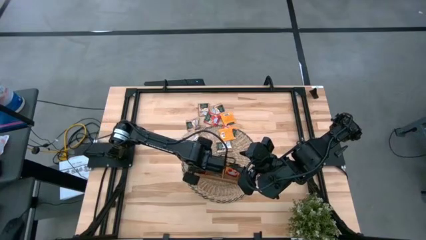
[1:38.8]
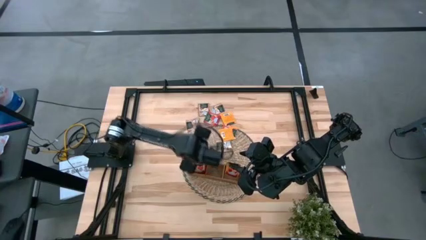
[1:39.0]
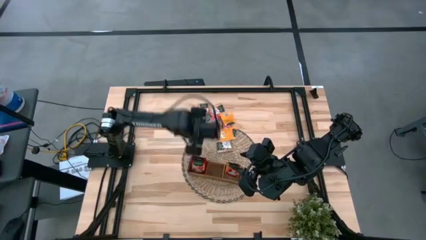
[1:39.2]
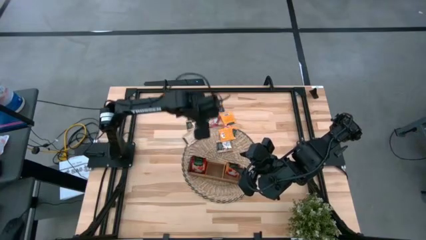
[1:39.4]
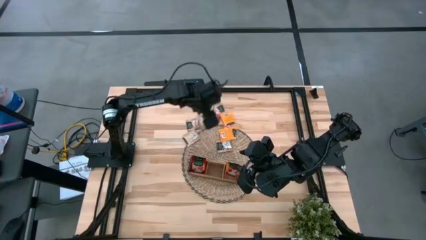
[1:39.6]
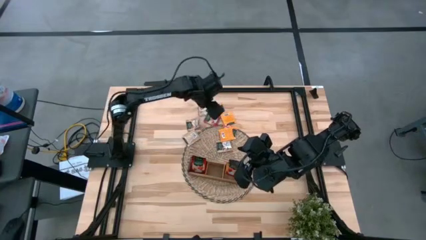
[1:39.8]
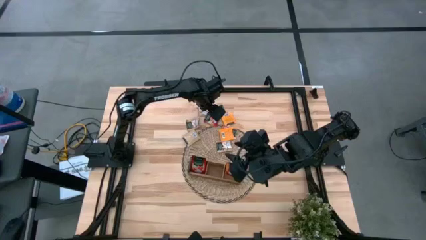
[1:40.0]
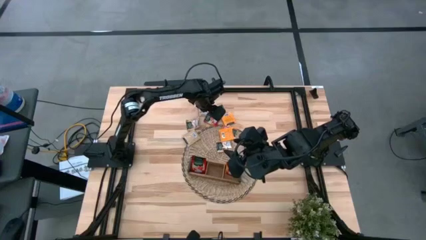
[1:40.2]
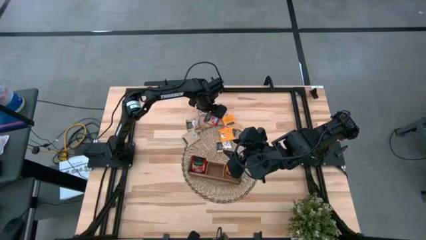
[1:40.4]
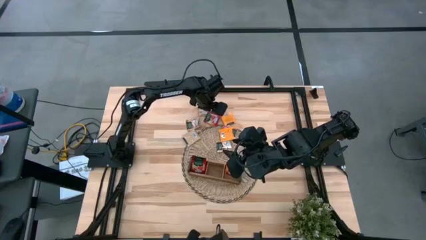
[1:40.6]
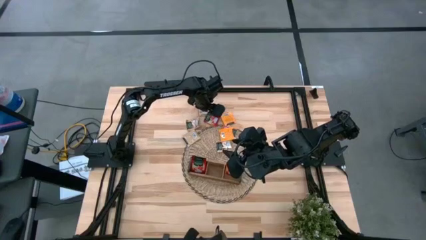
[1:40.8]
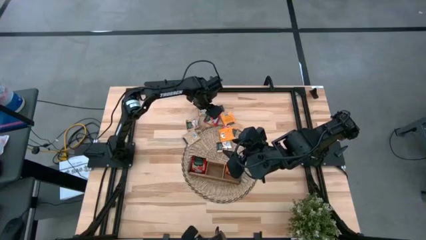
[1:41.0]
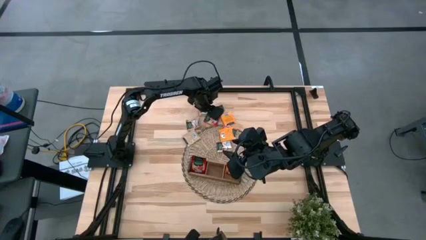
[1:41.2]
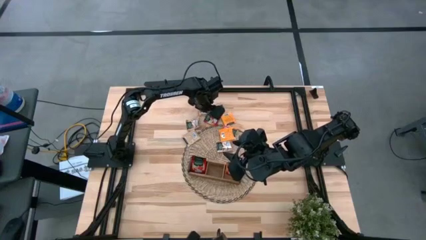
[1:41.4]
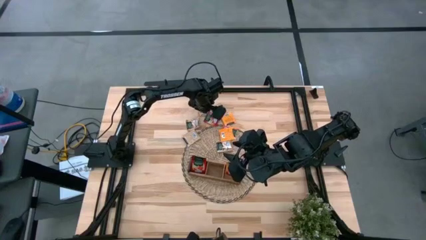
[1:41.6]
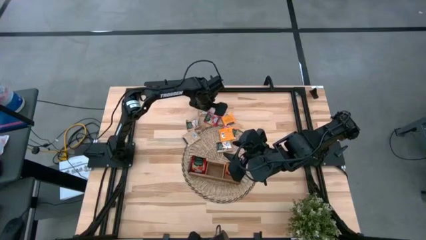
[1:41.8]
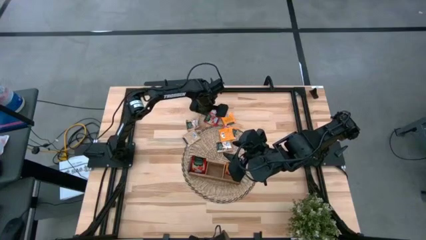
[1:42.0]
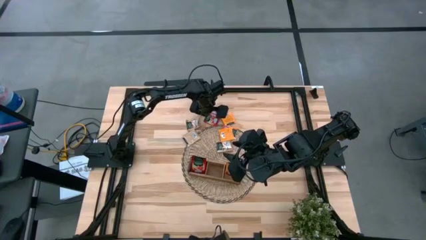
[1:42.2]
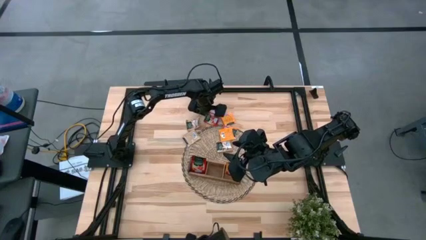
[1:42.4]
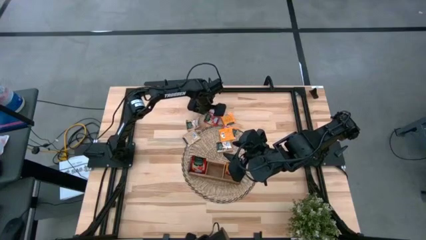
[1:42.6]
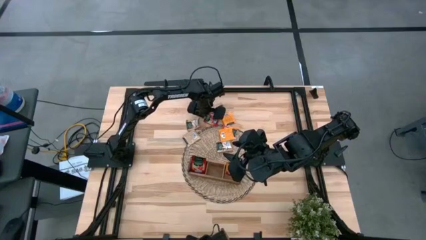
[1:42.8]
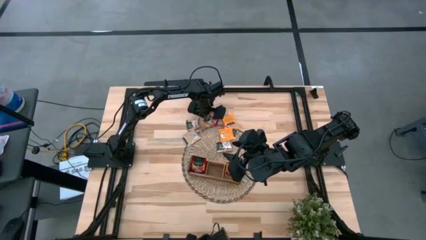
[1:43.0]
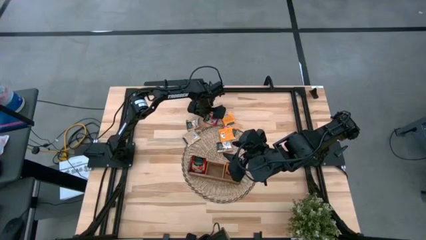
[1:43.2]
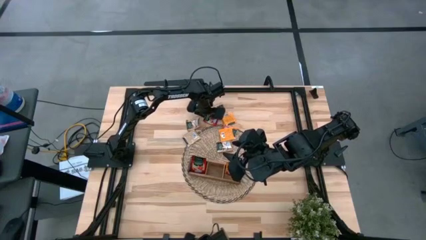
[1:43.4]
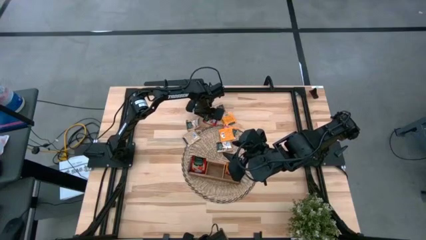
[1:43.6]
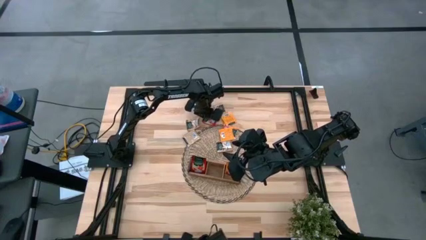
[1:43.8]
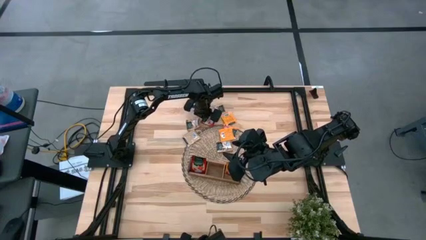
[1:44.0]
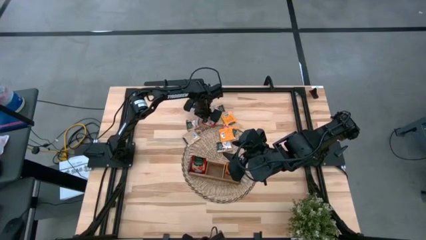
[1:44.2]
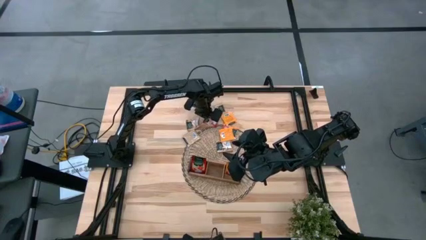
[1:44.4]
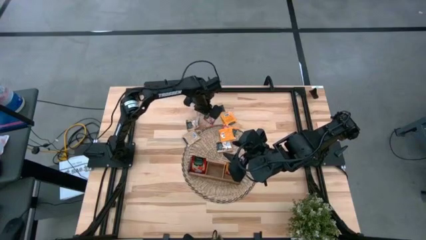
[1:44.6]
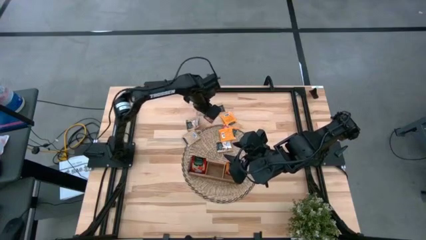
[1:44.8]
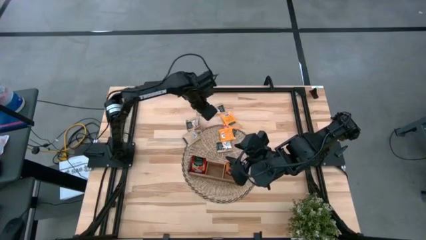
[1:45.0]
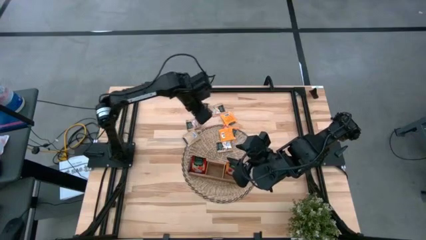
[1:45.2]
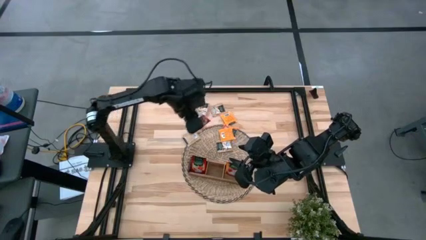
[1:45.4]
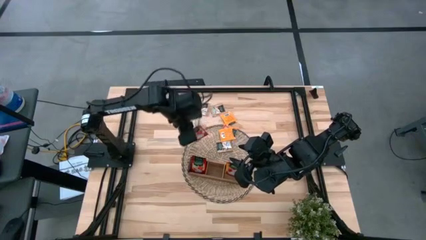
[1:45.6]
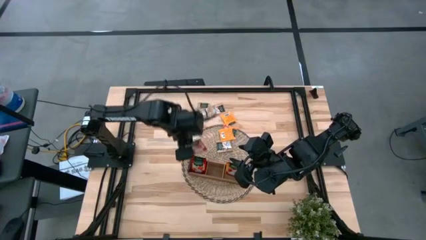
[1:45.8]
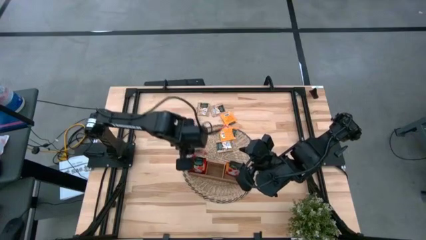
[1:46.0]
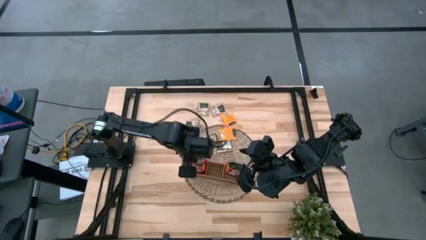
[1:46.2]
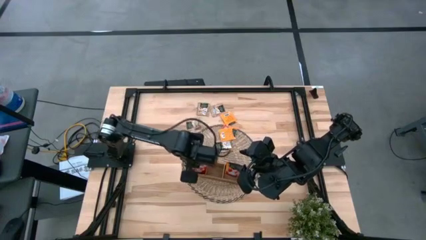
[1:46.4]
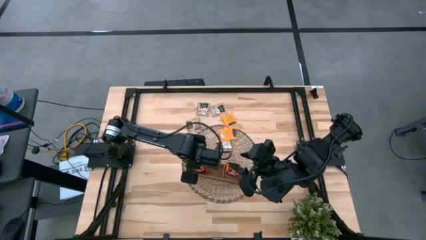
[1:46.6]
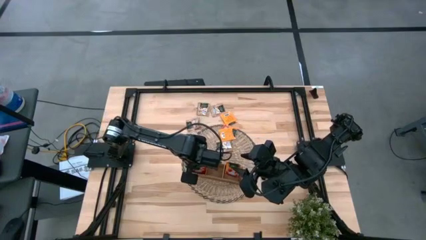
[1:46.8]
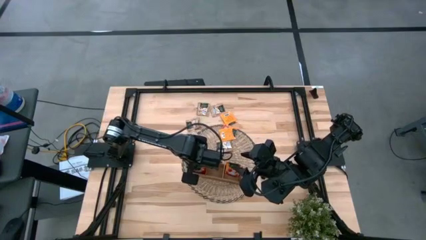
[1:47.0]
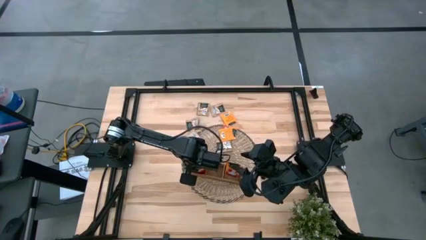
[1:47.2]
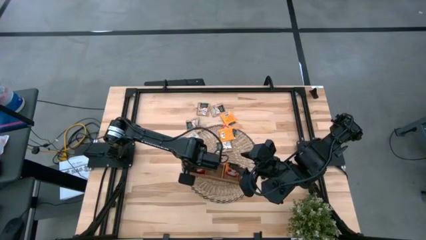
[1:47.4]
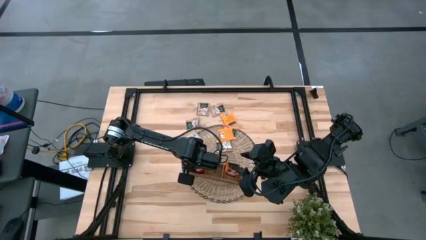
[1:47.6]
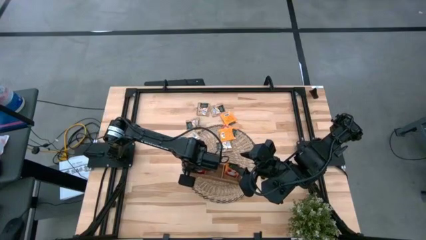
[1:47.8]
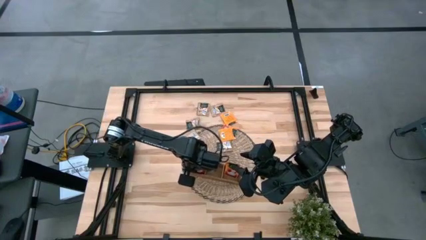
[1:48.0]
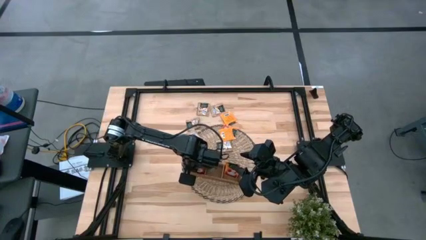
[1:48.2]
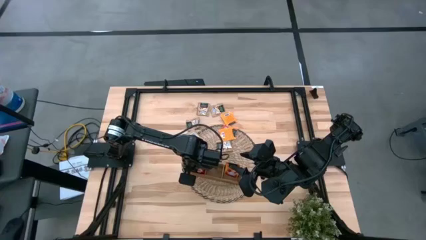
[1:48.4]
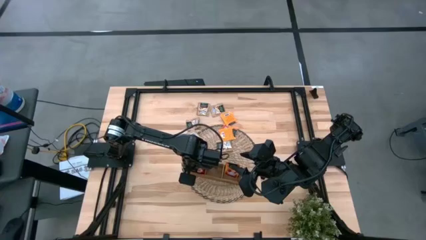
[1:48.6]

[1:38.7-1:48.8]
Task: Pick & Place Tea
Put the red tea bag into the left section of the wooden organizer

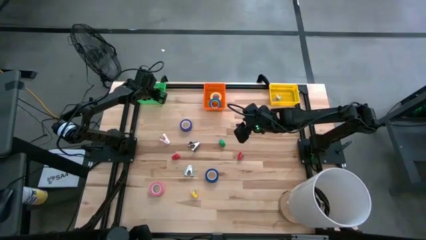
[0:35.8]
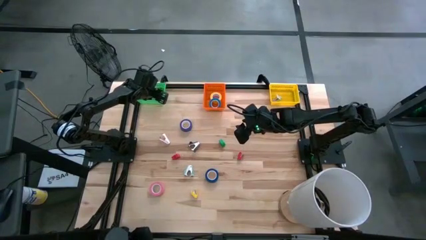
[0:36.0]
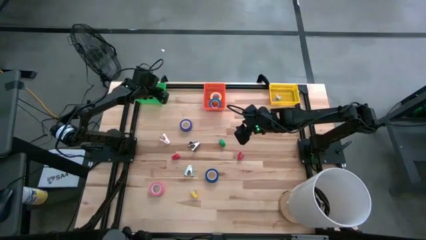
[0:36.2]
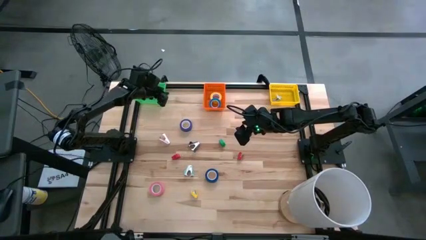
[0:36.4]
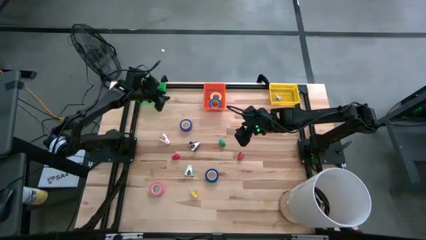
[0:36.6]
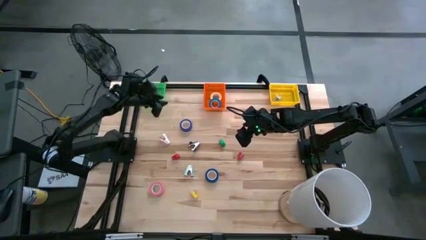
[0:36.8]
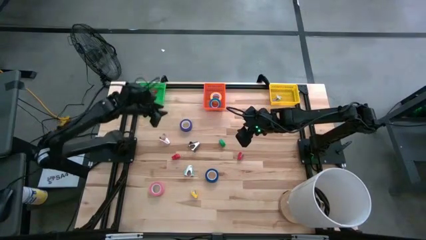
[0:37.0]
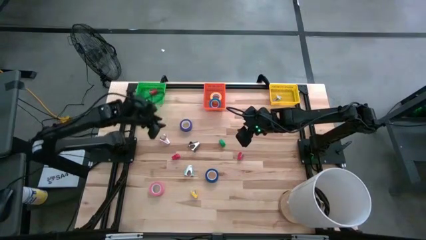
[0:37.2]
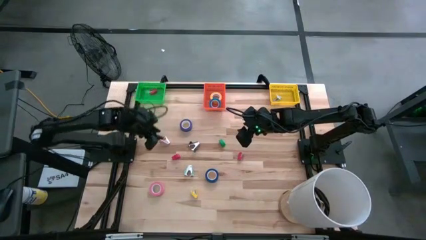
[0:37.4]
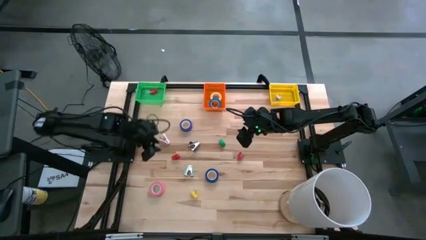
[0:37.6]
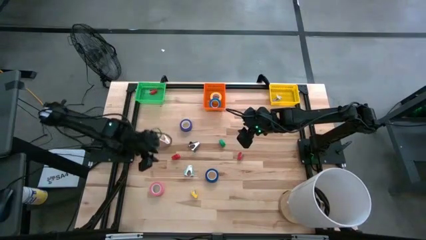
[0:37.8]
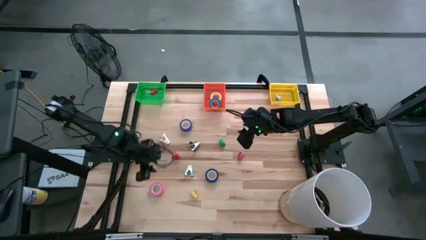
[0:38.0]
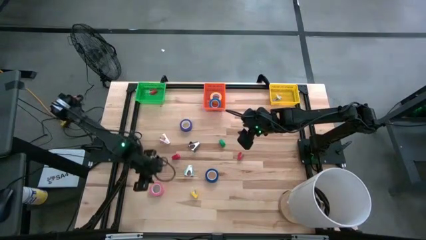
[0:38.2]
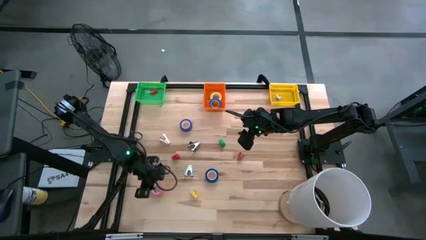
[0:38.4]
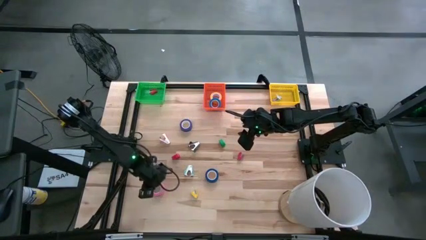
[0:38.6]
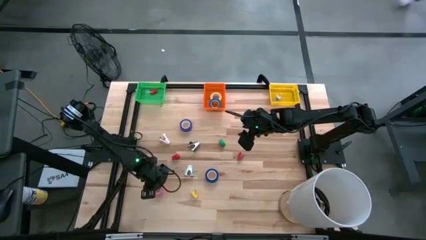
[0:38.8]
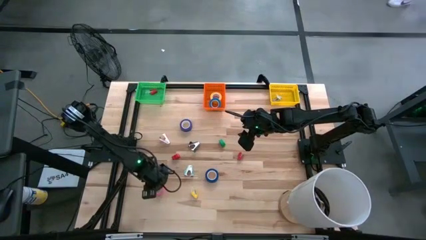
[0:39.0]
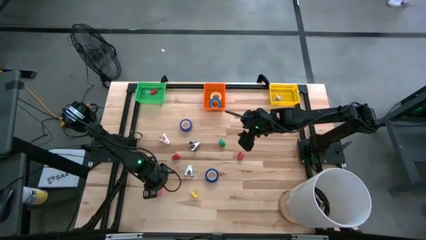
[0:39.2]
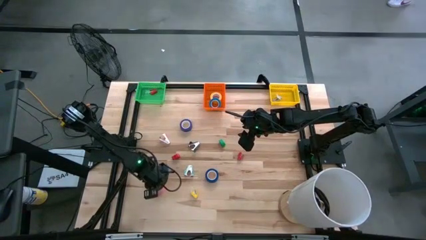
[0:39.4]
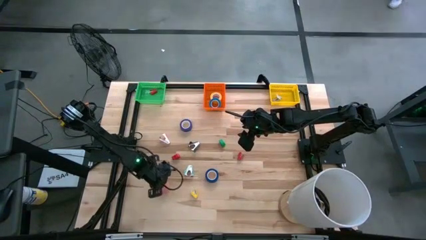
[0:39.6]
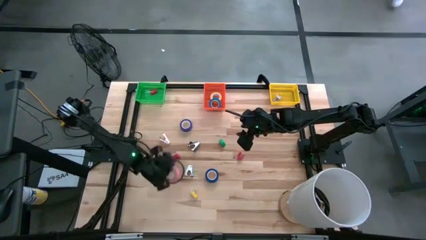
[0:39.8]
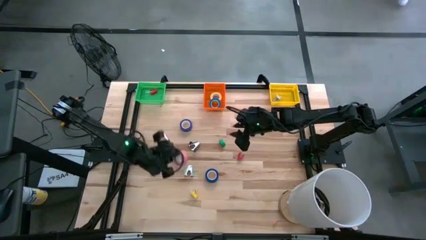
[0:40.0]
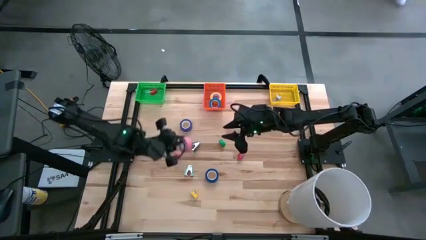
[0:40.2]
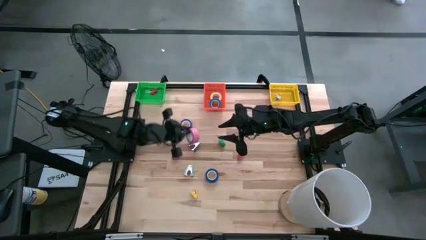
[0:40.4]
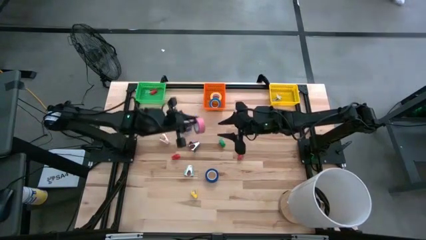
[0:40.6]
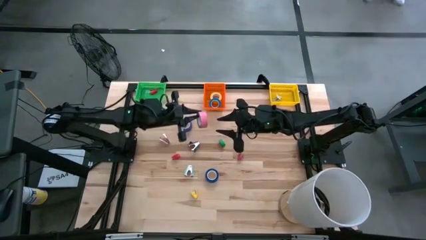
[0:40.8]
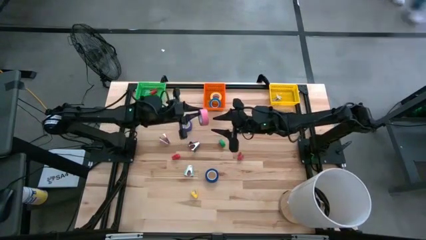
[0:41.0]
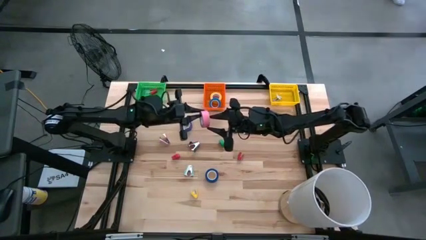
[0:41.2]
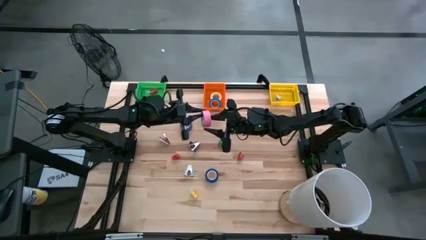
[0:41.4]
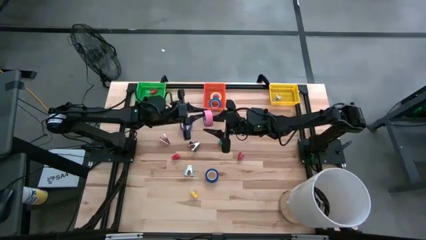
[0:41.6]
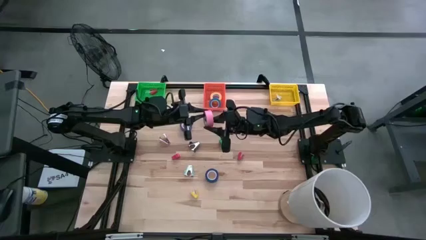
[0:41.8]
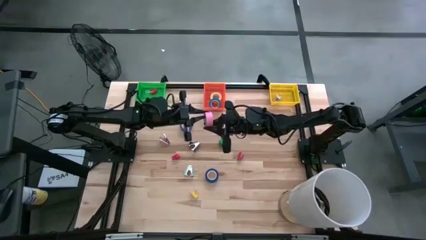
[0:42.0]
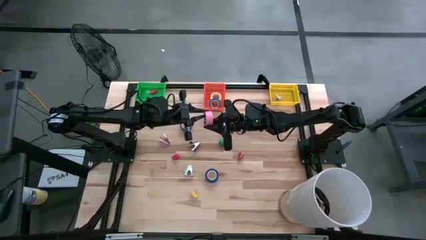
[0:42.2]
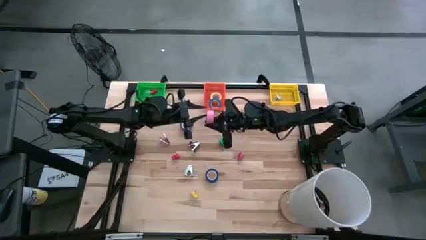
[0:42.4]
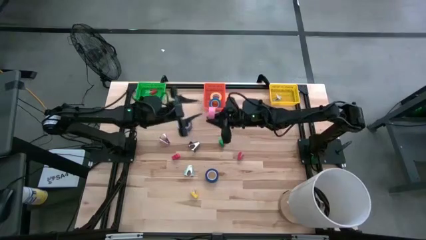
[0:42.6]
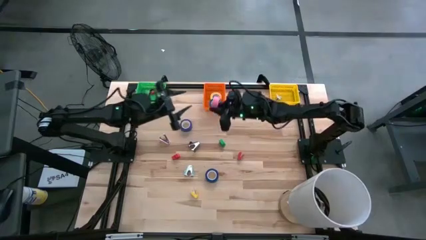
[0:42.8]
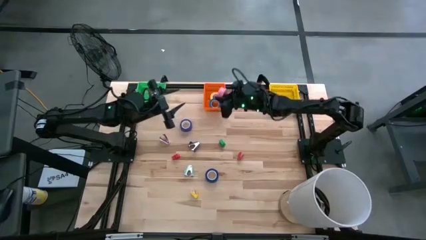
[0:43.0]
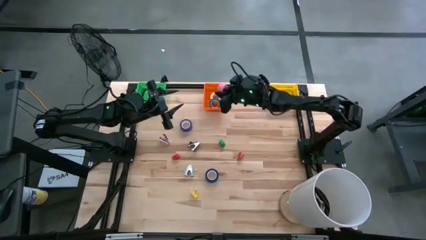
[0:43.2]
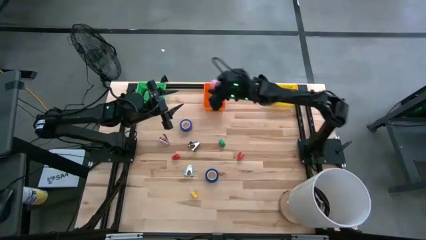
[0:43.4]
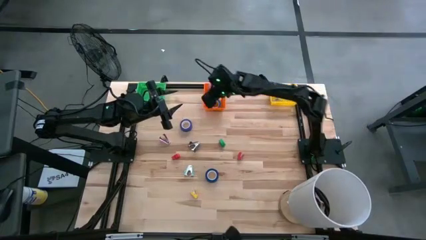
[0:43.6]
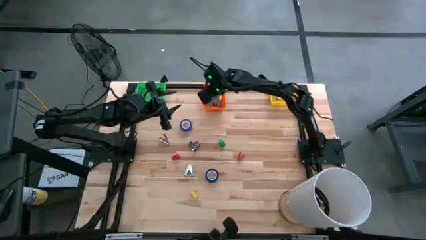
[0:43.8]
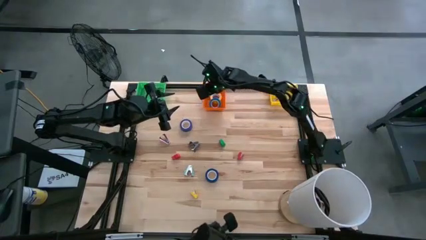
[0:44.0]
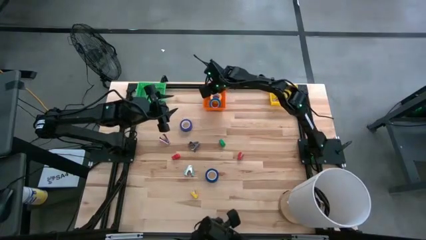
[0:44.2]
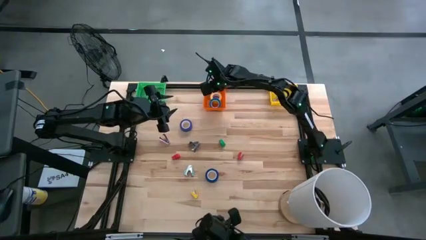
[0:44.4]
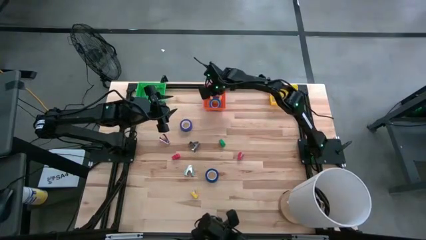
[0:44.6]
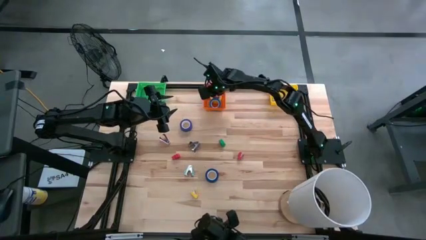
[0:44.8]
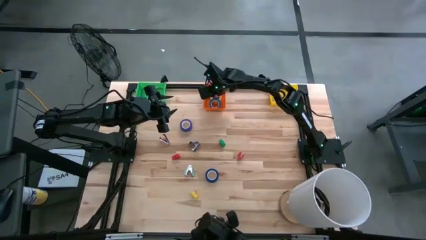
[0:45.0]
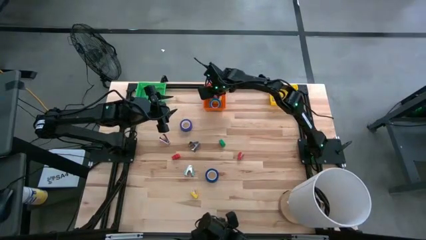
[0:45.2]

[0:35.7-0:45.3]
Task: Pick and place Stapler, Stapler remover, tape
Put the pink tape into the orange bin
